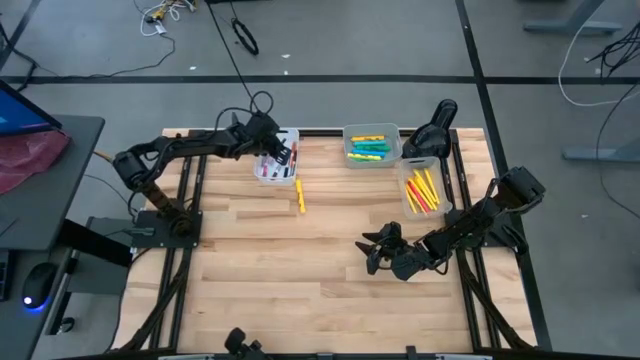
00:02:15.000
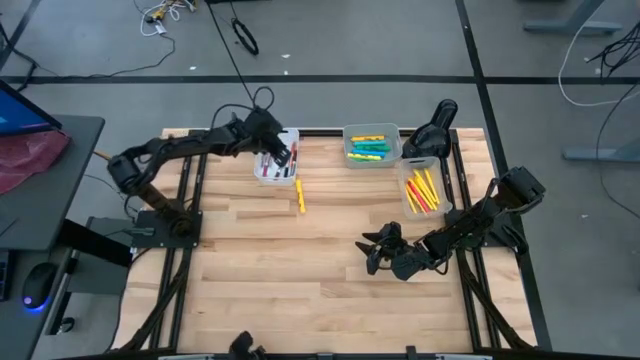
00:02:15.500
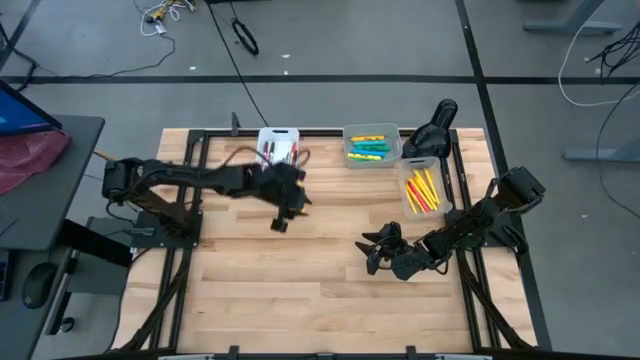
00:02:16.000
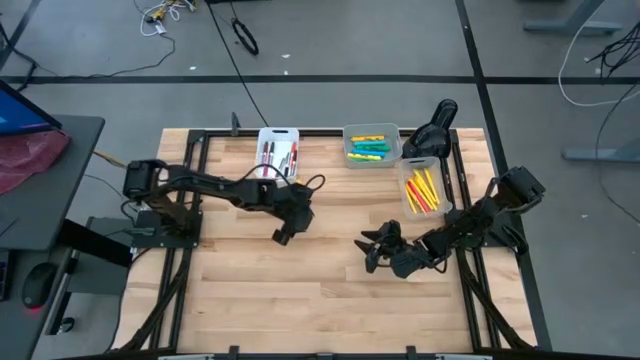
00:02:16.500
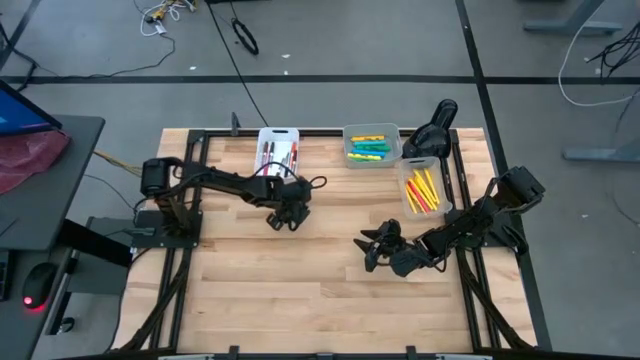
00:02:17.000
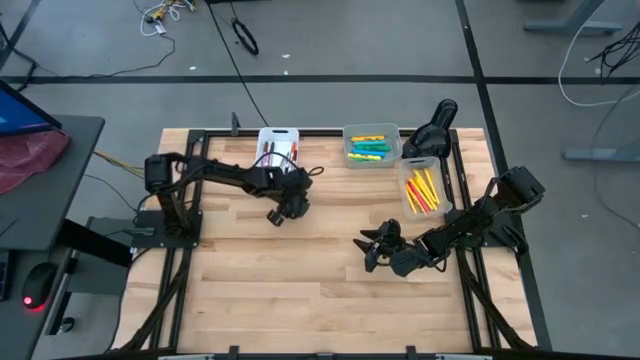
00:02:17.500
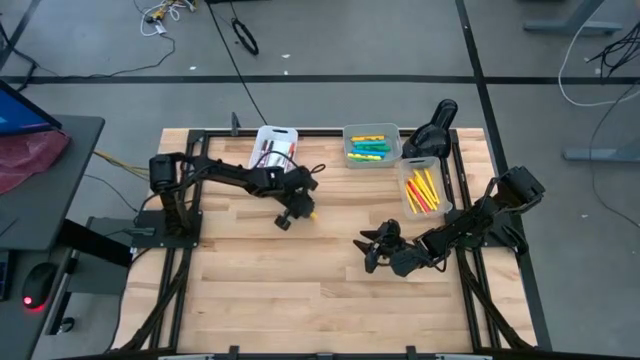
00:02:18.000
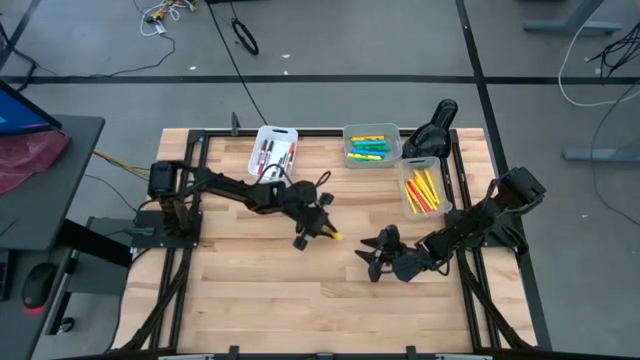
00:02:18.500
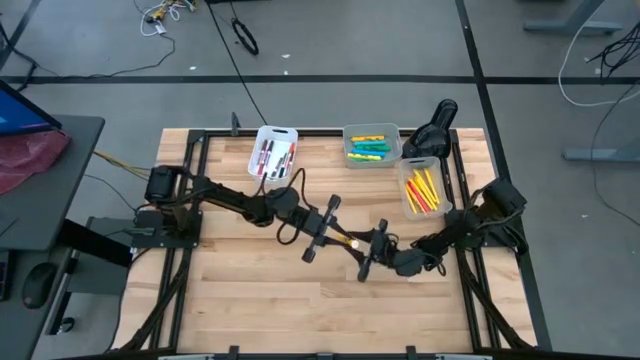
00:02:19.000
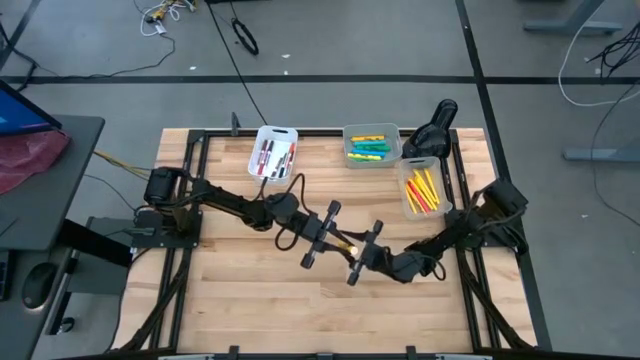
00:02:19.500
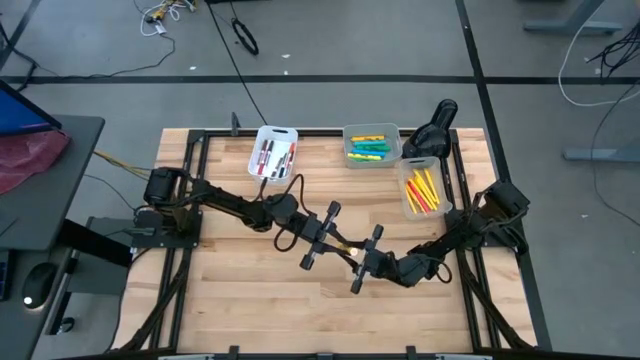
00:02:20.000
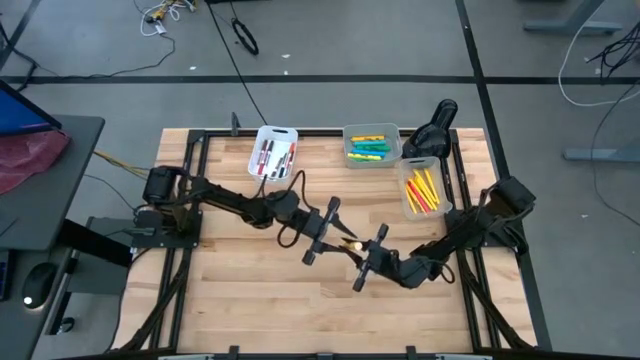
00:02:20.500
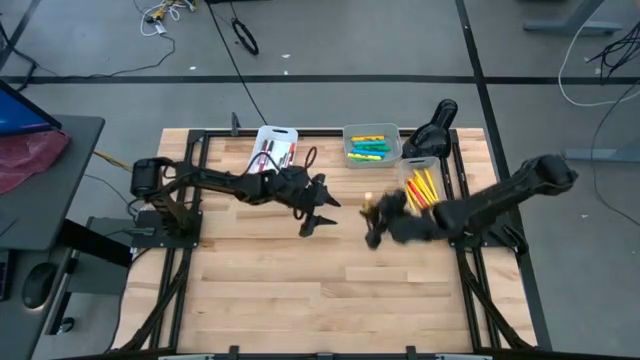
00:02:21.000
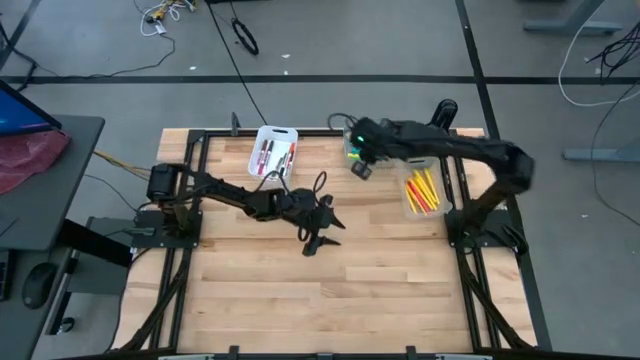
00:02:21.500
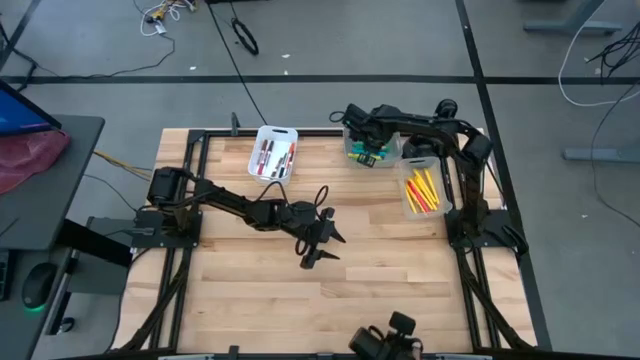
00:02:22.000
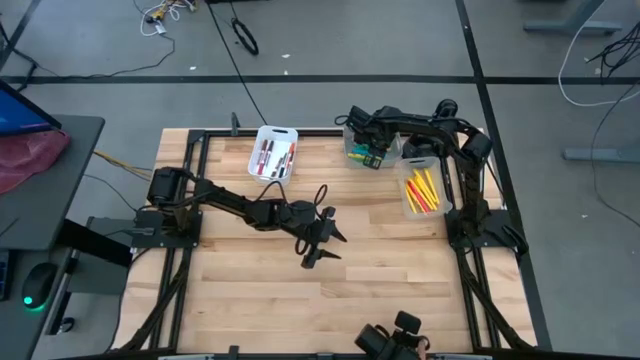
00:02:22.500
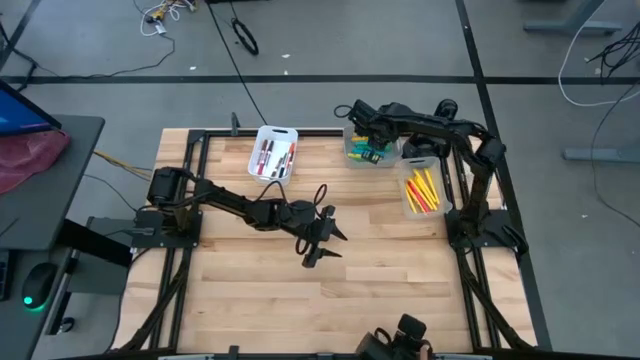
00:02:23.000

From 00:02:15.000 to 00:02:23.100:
Task: Pick & Place Markers
Put the yellow highlighter pen into the gray bin

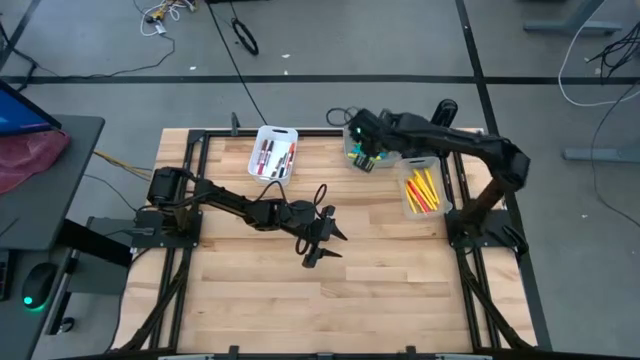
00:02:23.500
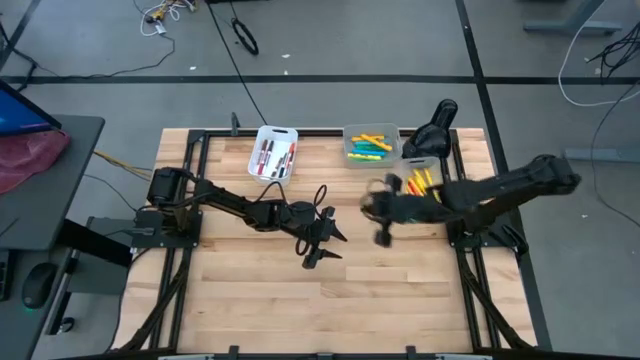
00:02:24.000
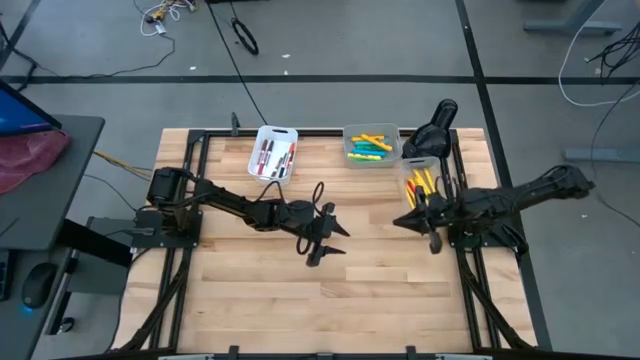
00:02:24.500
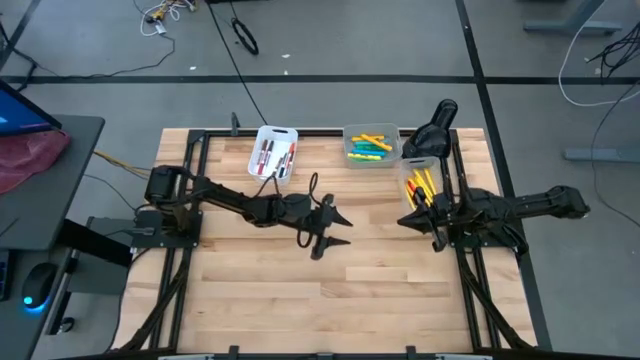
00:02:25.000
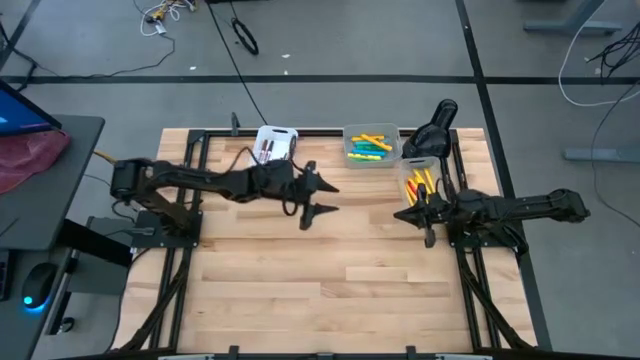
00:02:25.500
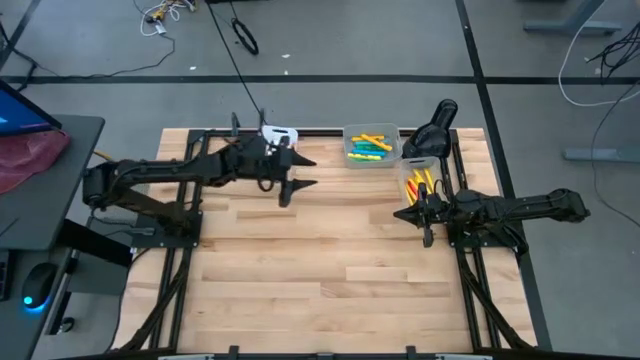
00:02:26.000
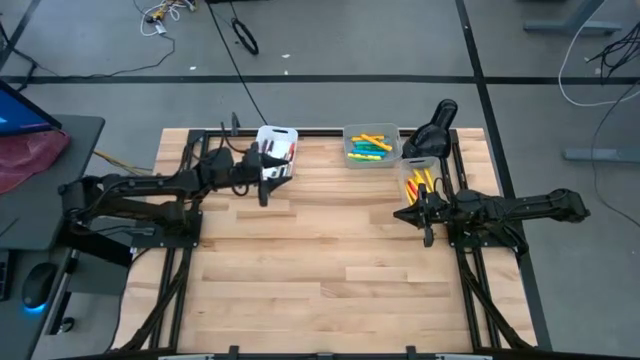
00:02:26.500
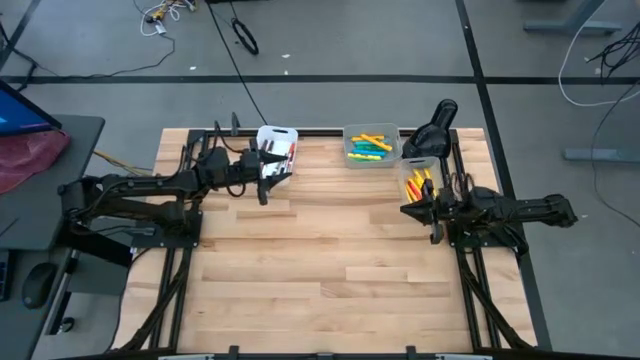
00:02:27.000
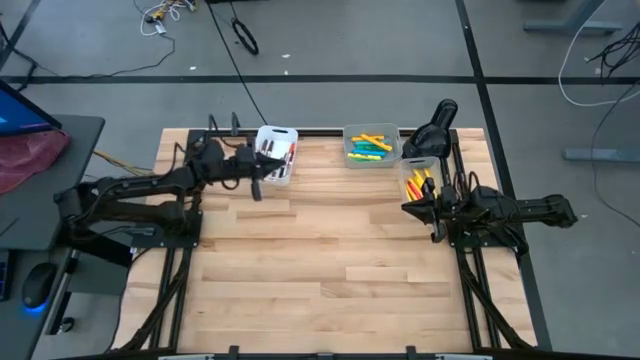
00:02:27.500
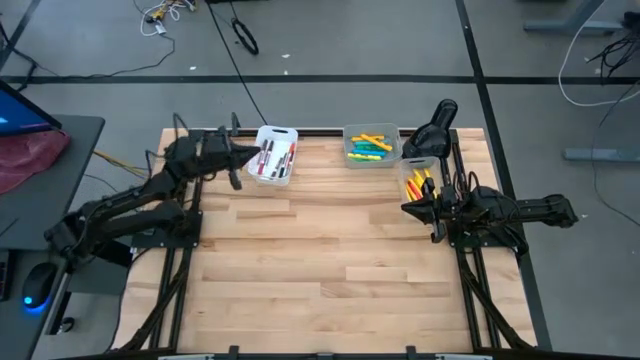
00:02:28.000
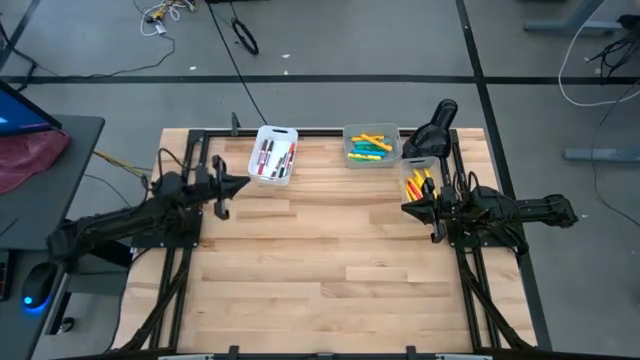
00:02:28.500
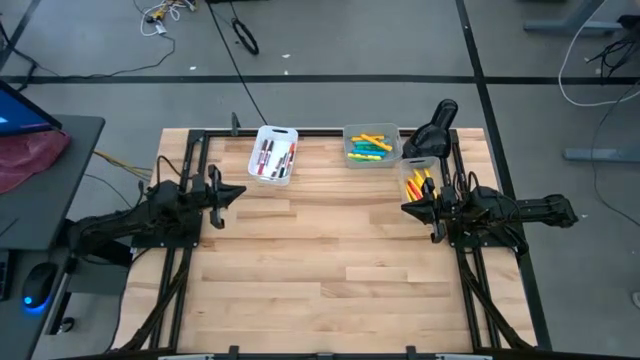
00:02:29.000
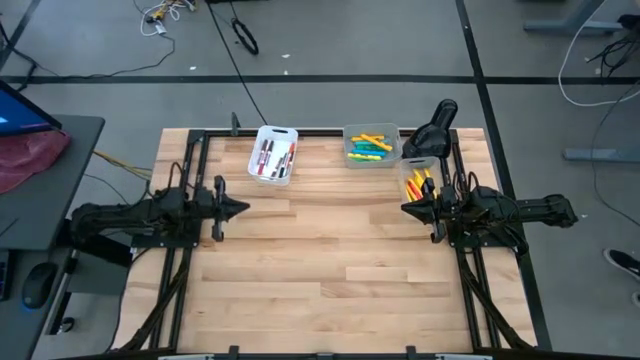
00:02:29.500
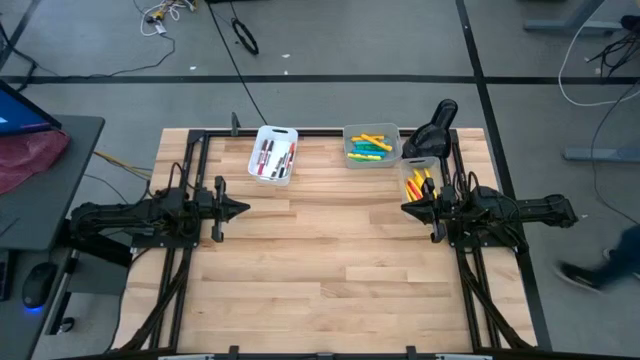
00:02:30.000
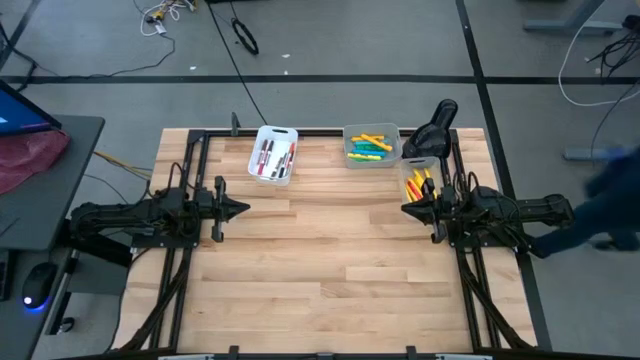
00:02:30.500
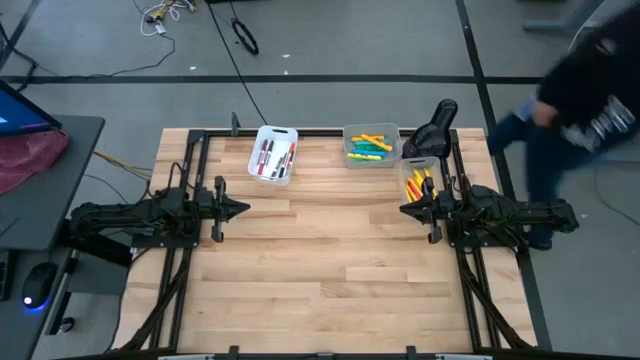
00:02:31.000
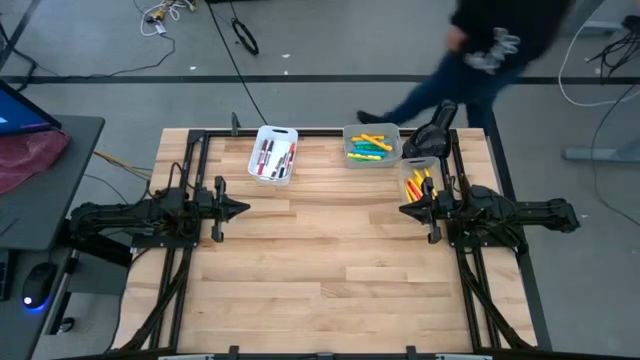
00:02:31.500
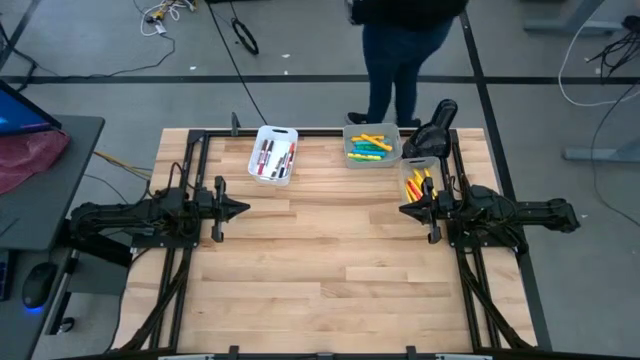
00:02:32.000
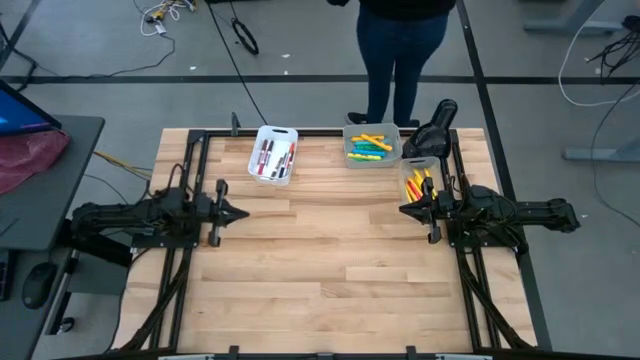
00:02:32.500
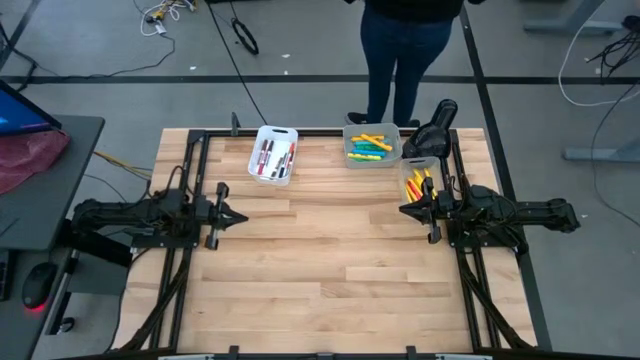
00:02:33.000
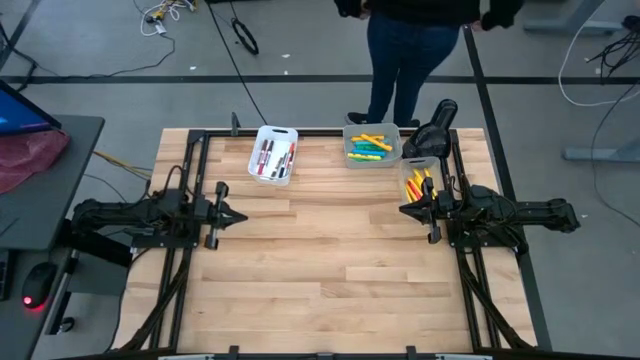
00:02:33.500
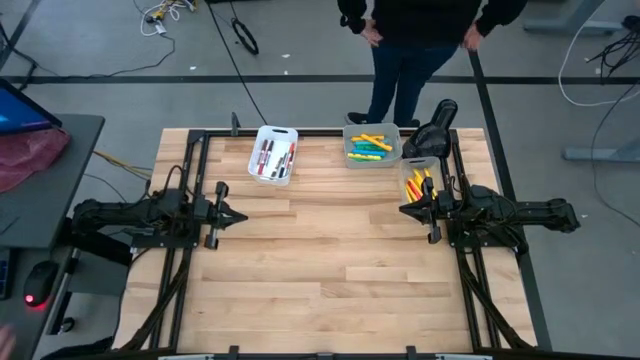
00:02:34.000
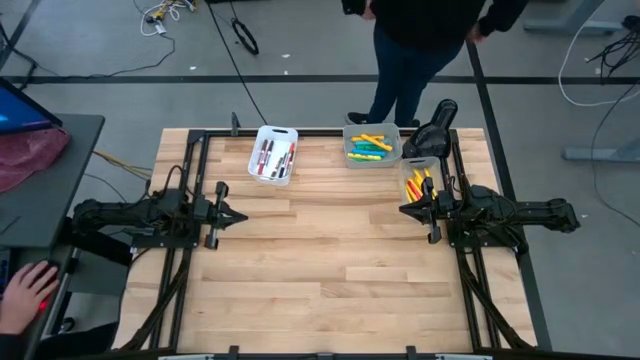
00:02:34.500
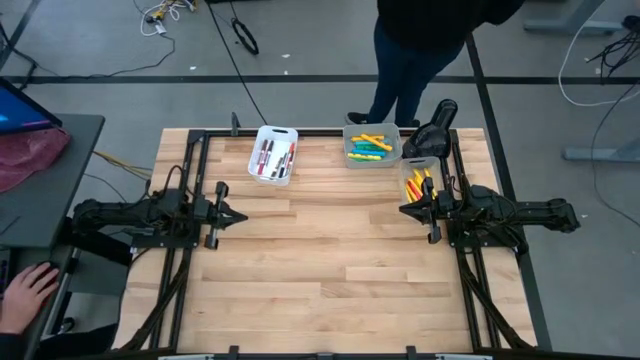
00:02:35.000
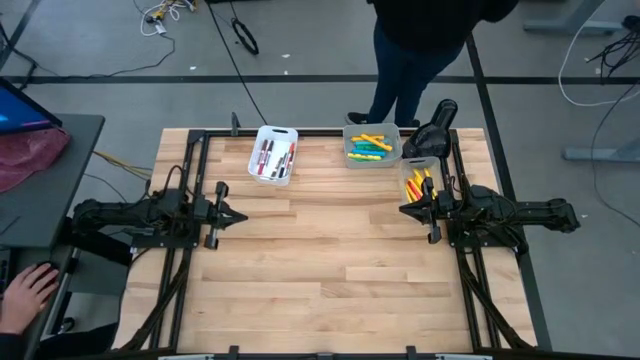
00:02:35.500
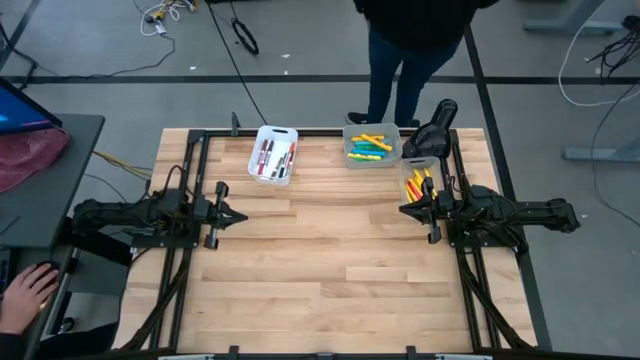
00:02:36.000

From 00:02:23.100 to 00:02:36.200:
Return to Home Position
